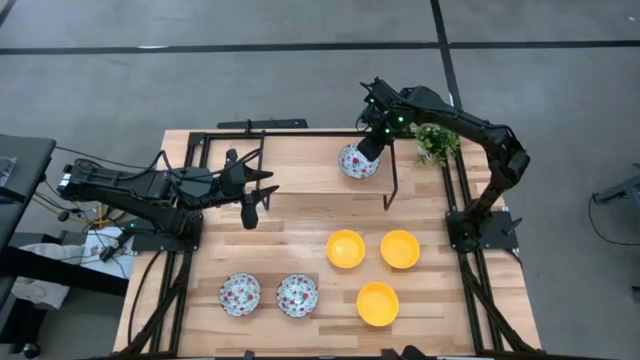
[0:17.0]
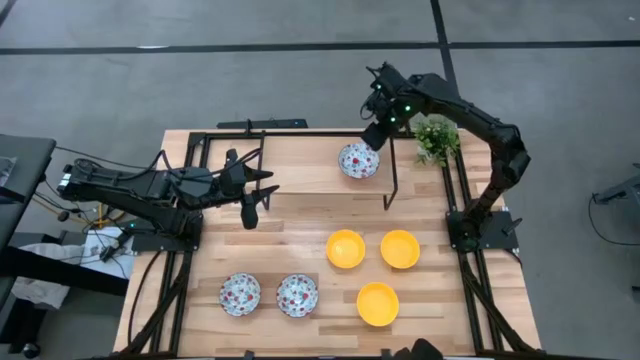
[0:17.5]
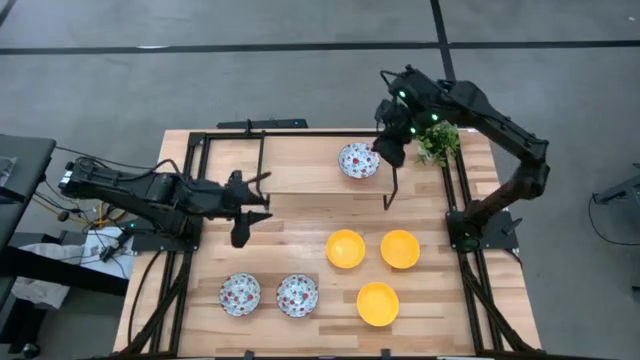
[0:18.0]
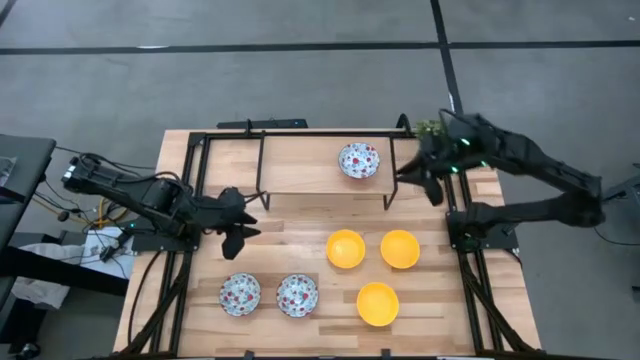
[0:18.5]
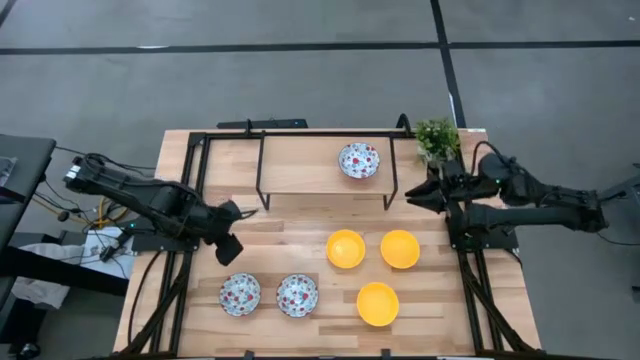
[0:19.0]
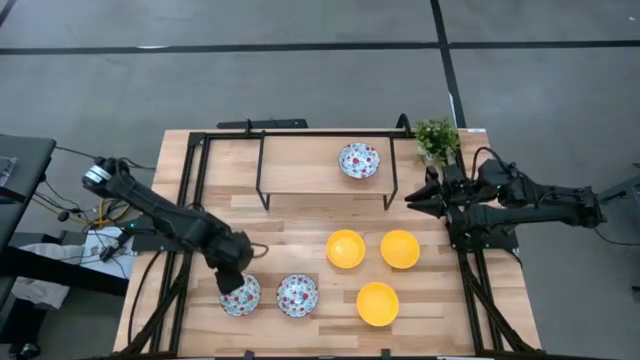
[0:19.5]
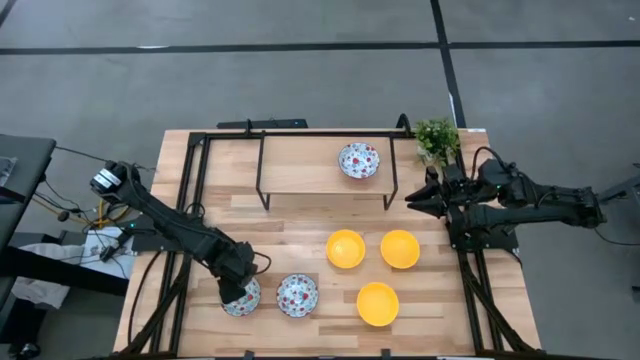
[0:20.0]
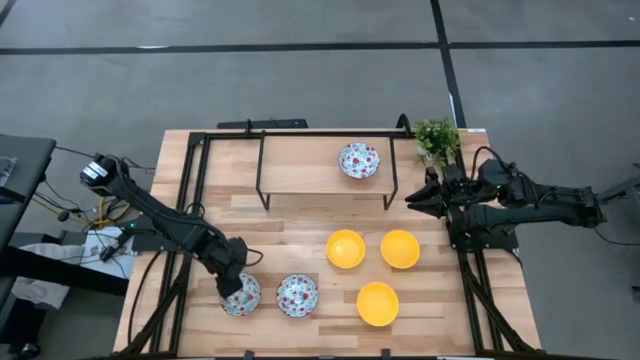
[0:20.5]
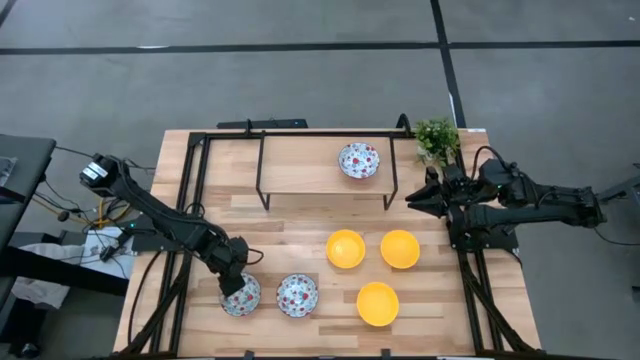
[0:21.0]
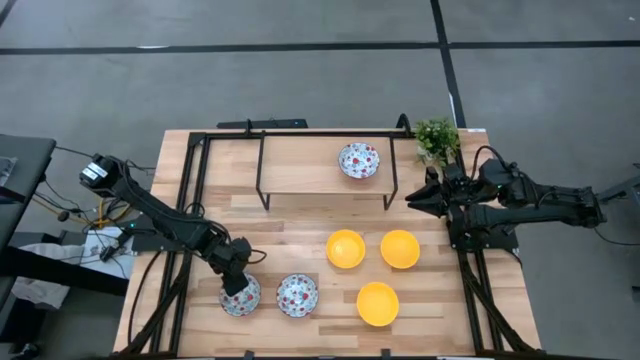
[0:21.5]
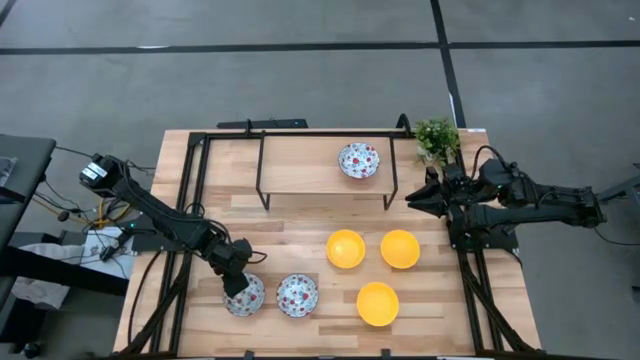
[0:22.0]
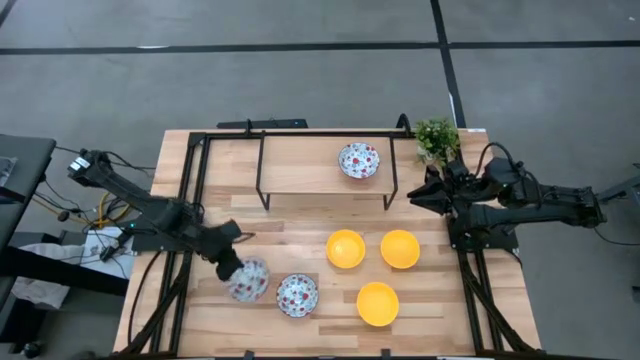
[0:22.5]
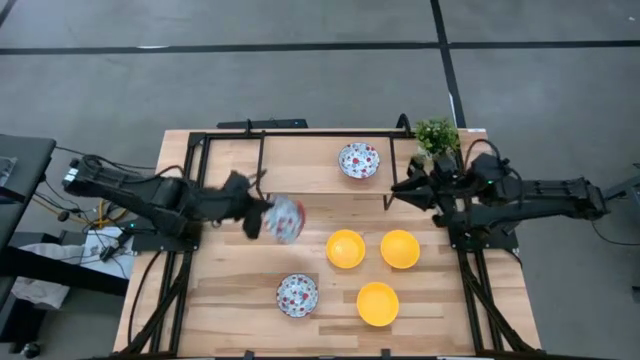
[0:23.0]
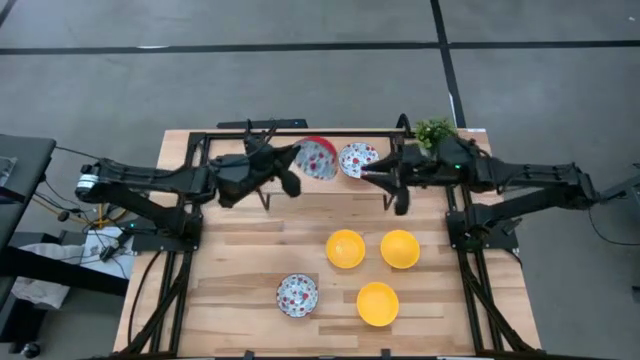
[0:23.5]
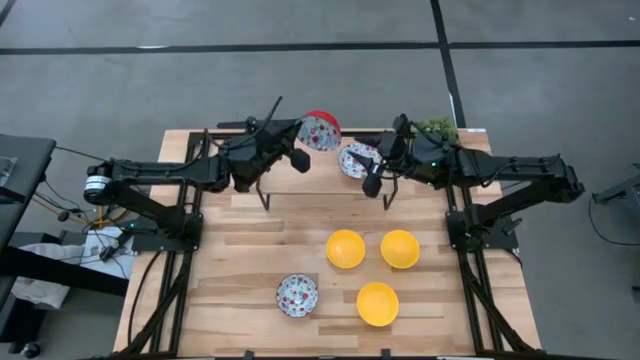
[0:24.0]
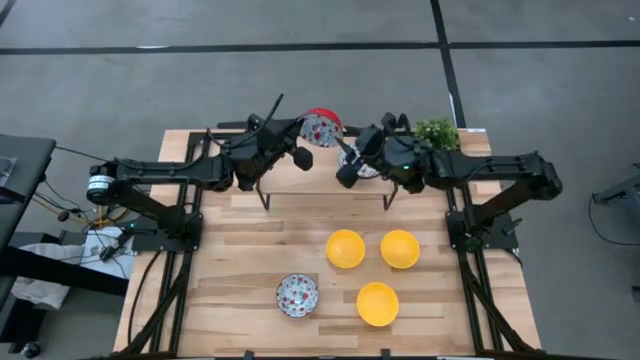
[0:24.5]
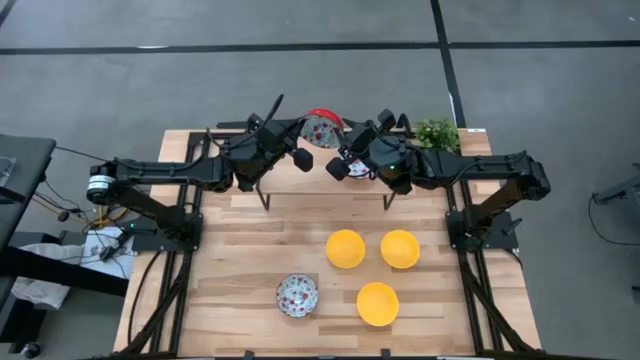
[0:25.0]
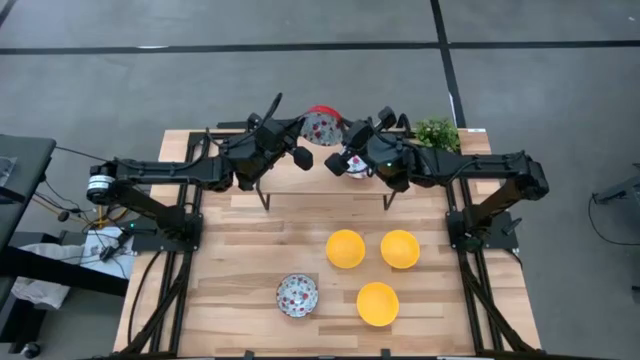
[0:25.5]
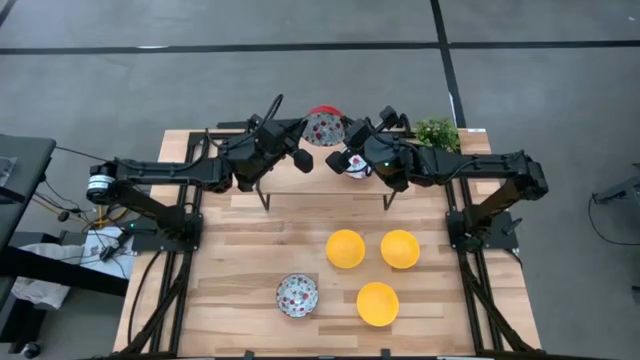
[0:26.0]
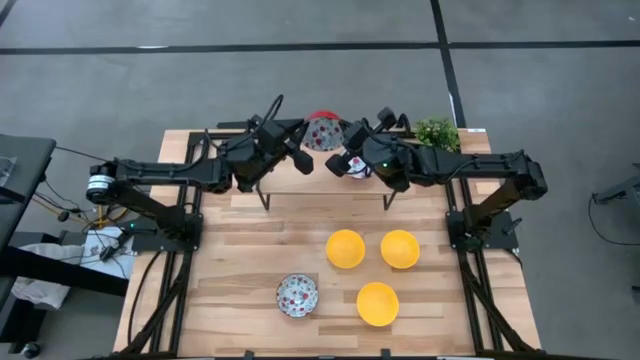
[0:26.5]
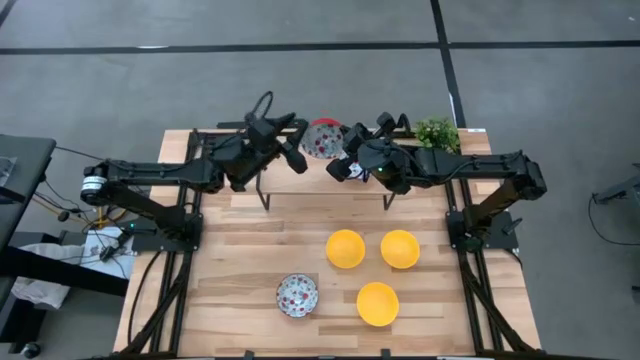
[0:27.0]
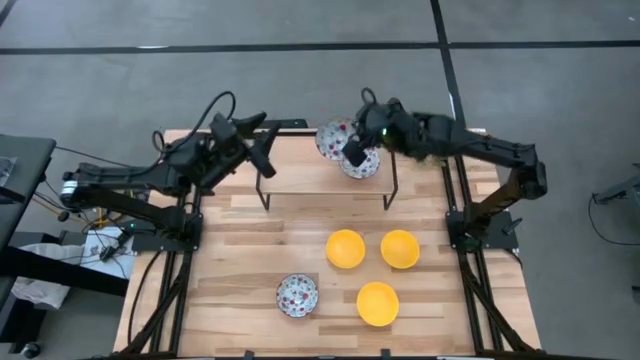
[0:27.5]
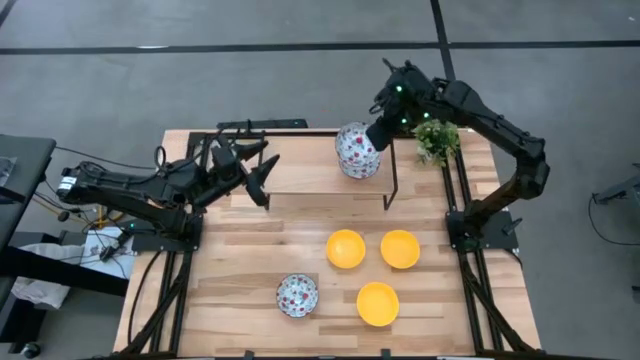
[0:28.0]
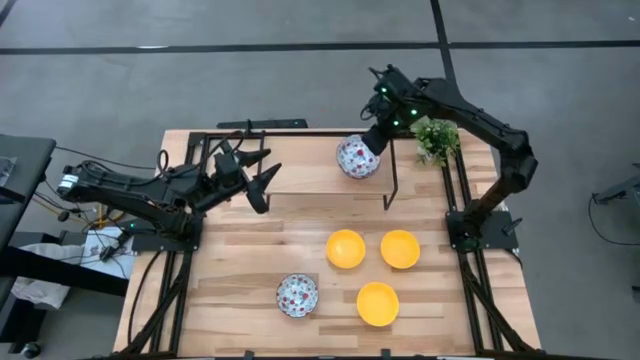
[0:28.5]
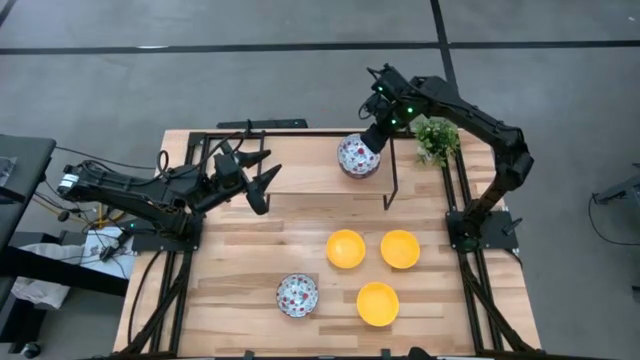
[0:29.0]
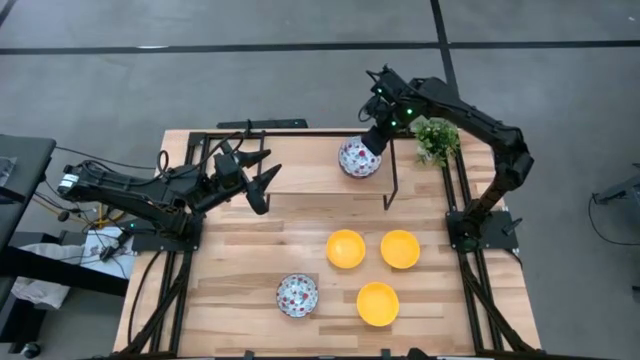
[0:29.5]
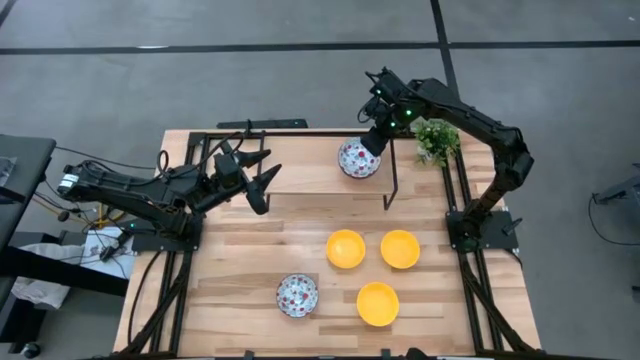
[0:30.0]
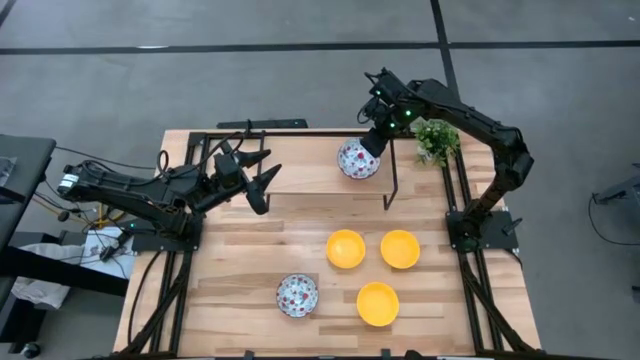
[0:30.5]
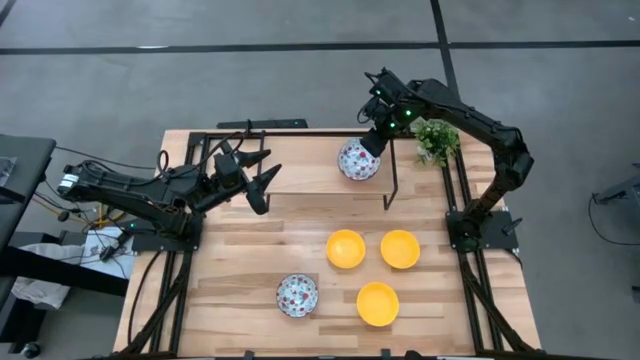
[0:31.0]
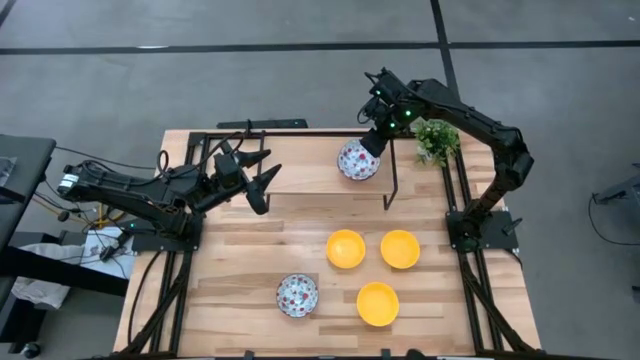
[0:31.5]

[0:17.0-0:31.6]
Task: Pick & Place Mini bowls
Stack the left red patterned bowl on the red patterned bowl on the shelf

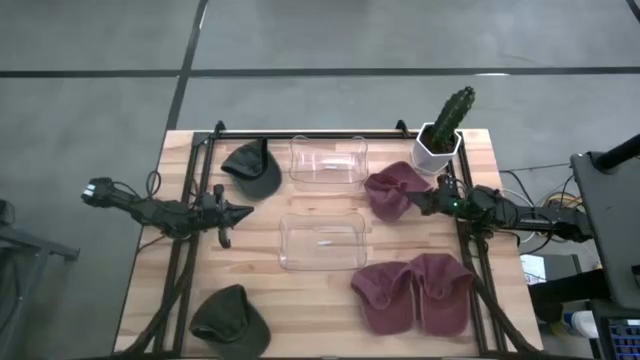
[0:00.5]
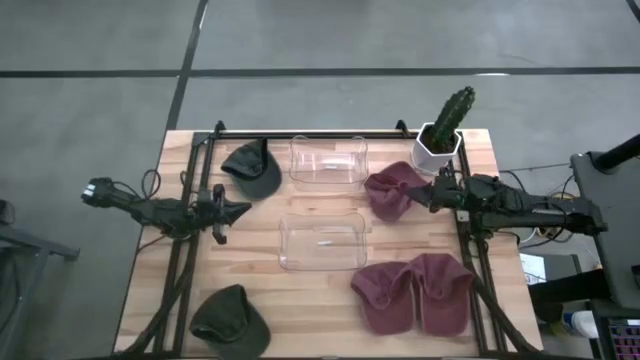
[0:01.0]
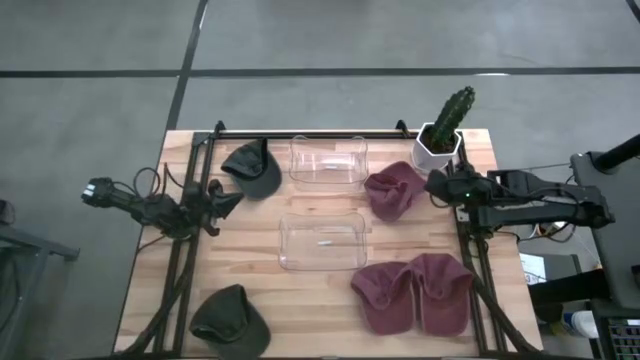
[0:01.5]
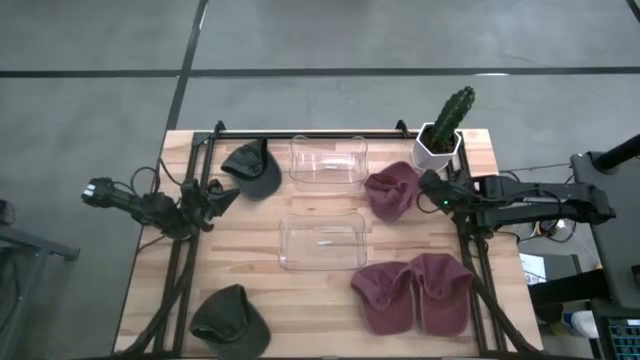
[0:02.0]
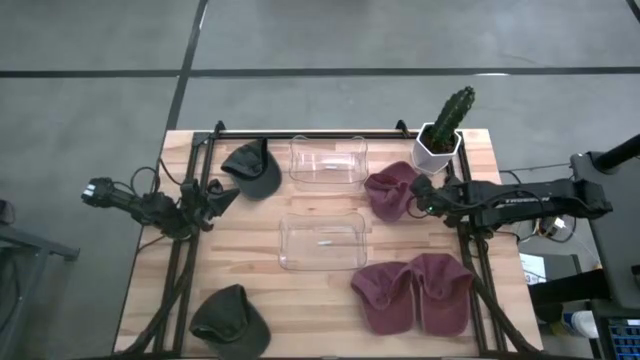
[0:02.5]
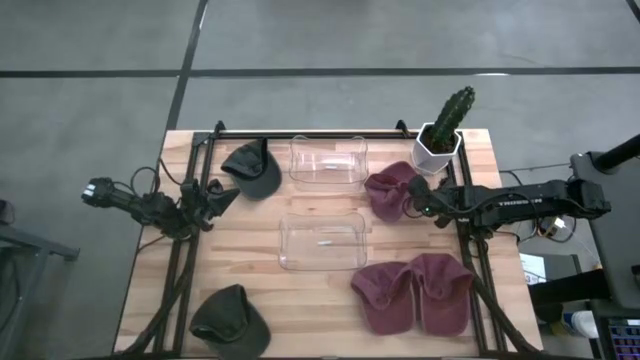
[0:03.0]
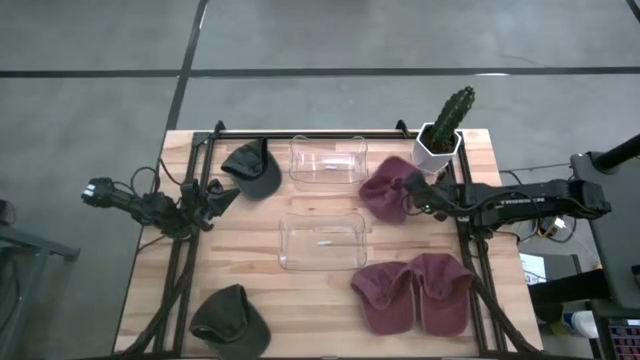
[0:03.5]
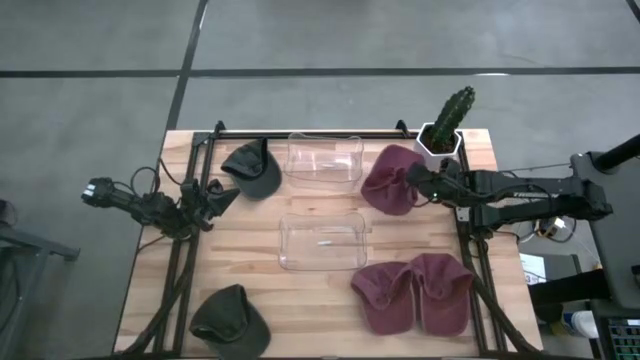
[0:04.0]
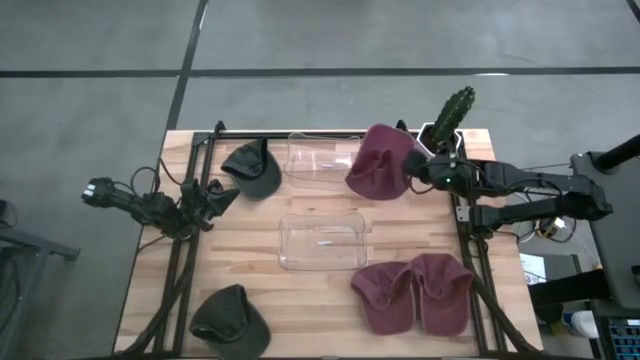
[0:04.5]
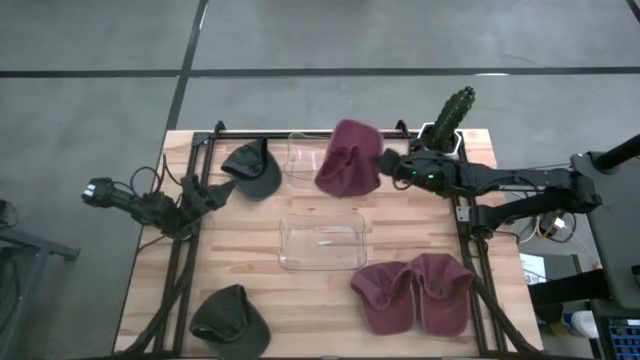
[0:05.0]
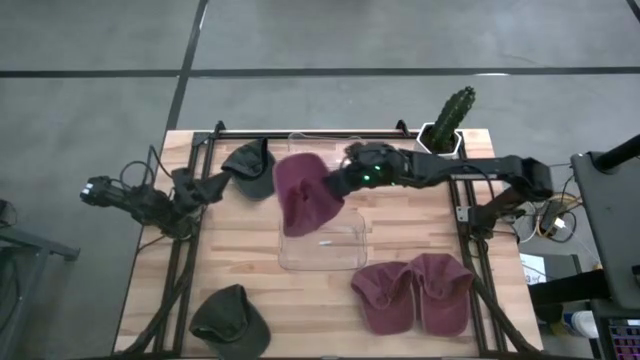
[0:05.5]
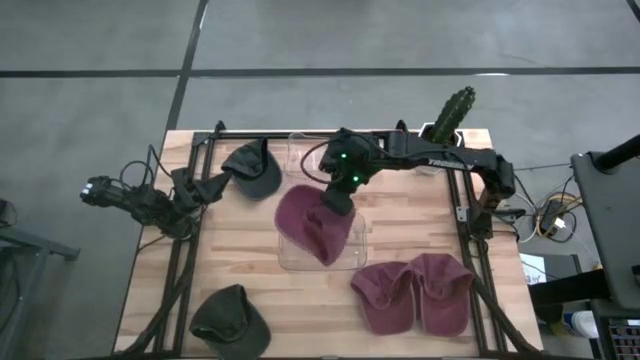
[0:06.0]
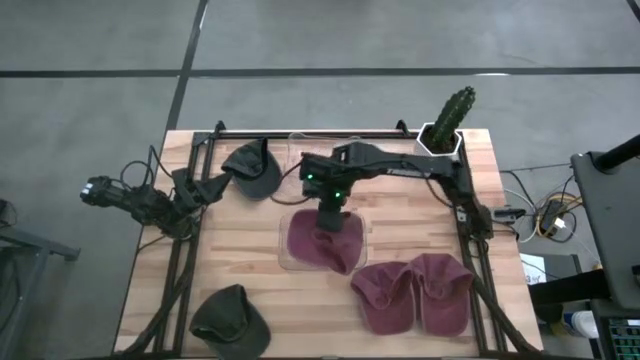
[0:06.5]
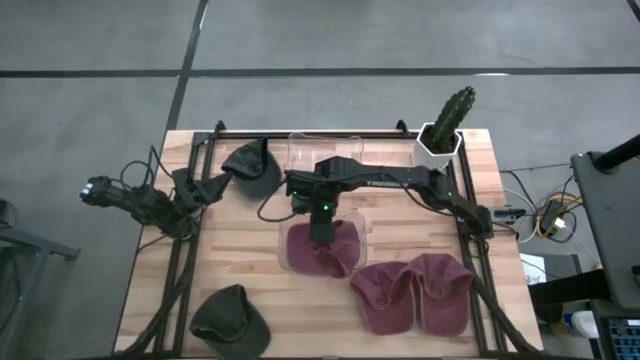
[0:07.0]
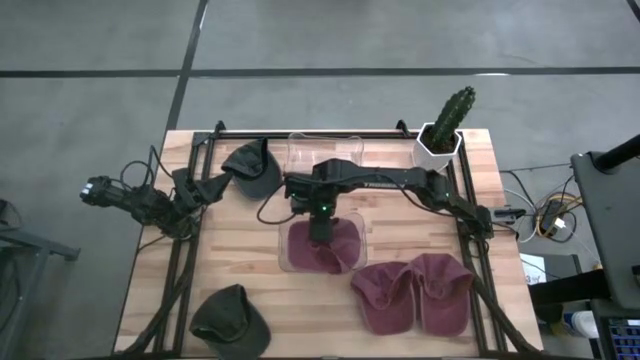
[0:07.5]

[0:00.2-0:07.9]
Task: Pick & Place hat
Put the top red cap into the bottom transparent bin
